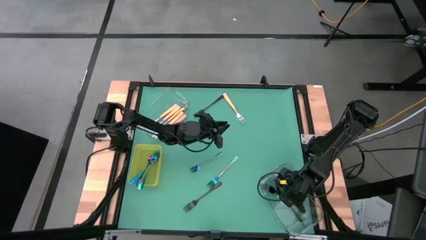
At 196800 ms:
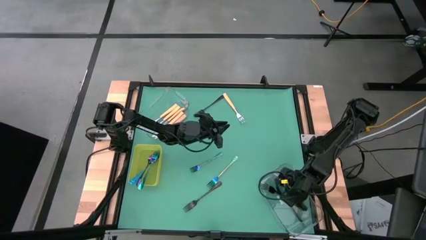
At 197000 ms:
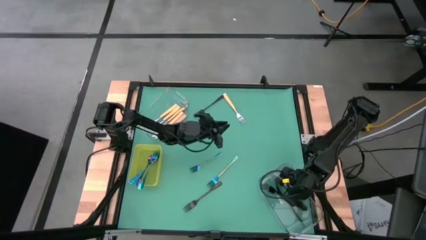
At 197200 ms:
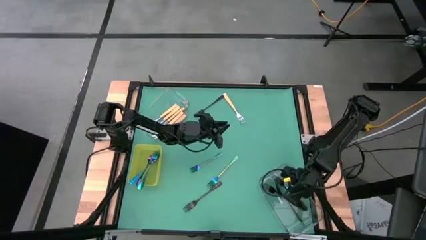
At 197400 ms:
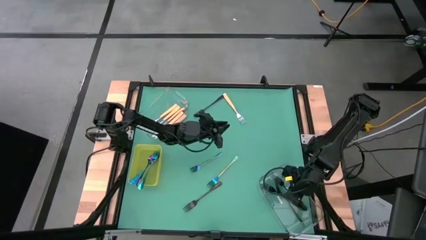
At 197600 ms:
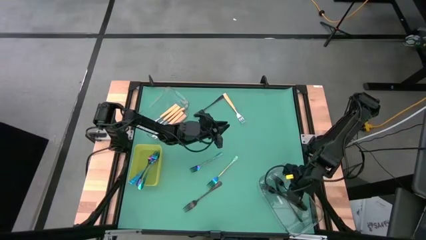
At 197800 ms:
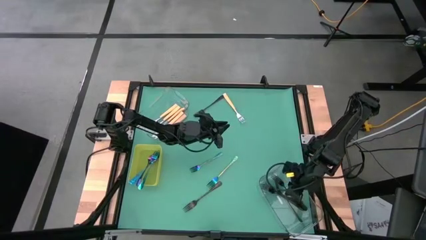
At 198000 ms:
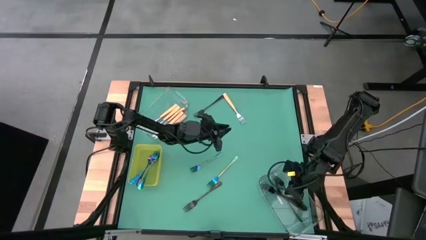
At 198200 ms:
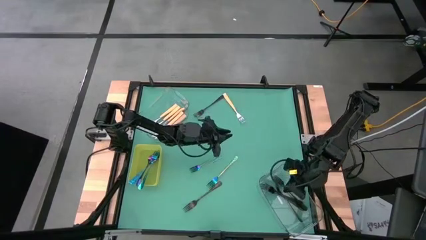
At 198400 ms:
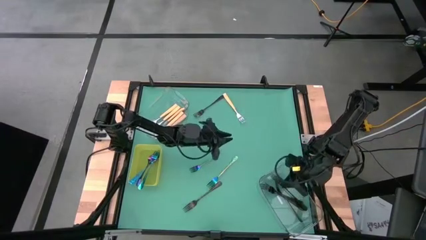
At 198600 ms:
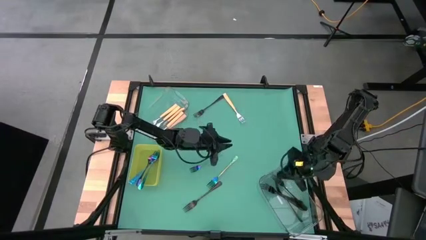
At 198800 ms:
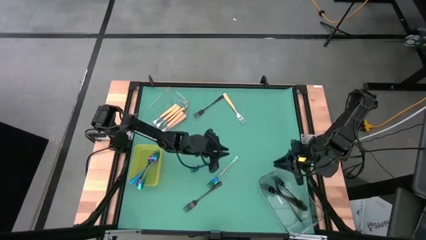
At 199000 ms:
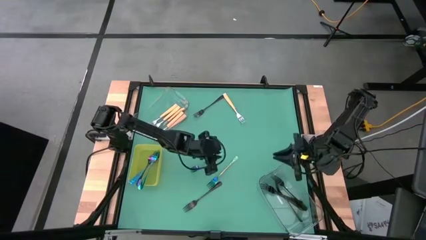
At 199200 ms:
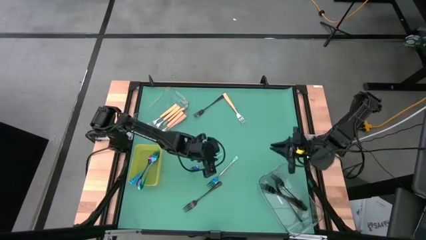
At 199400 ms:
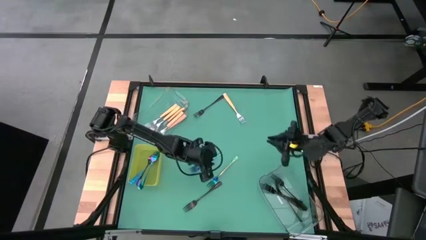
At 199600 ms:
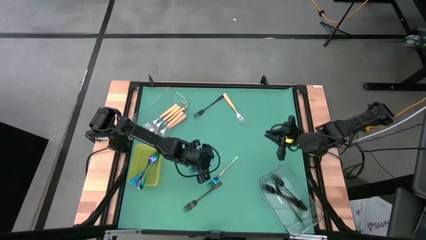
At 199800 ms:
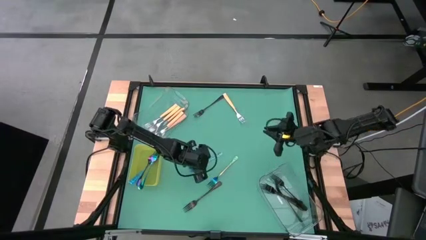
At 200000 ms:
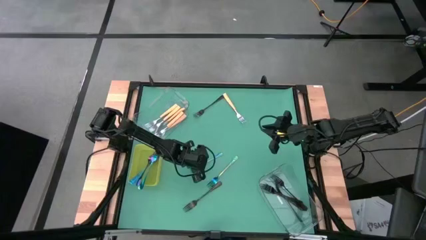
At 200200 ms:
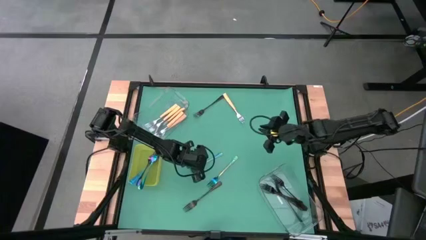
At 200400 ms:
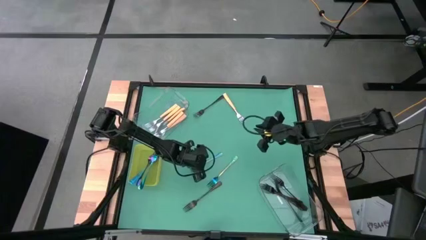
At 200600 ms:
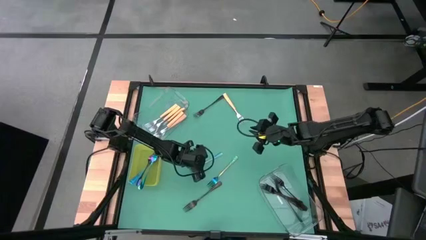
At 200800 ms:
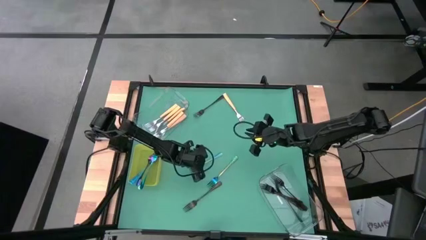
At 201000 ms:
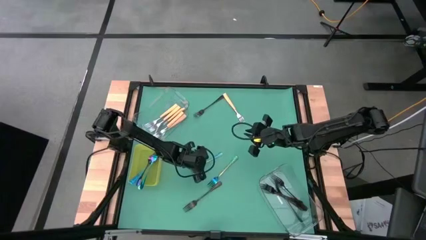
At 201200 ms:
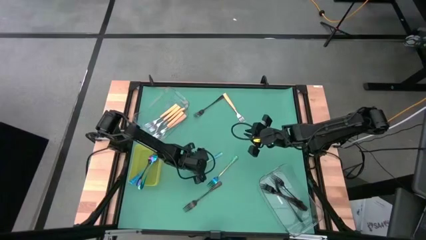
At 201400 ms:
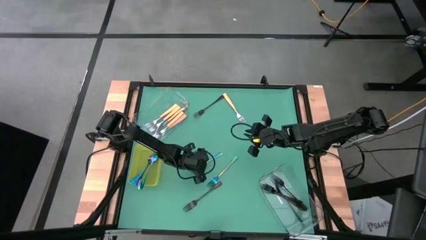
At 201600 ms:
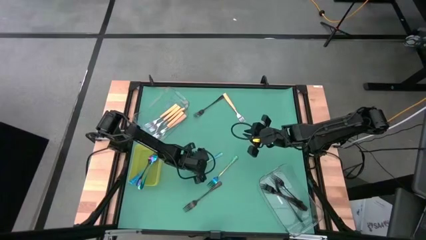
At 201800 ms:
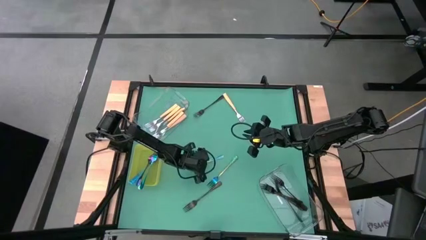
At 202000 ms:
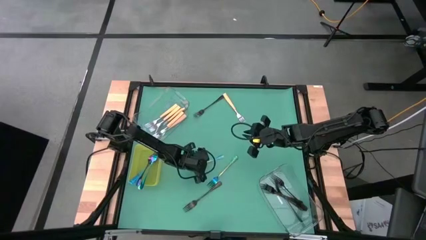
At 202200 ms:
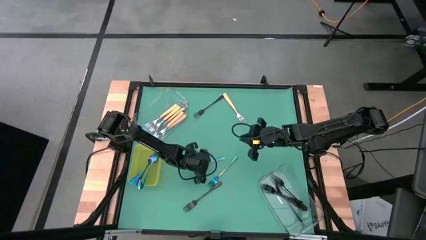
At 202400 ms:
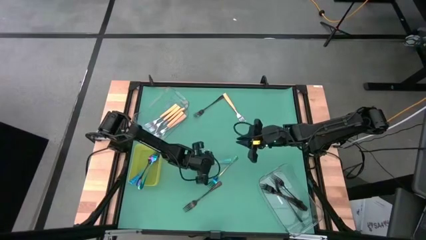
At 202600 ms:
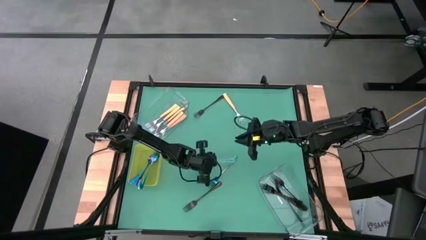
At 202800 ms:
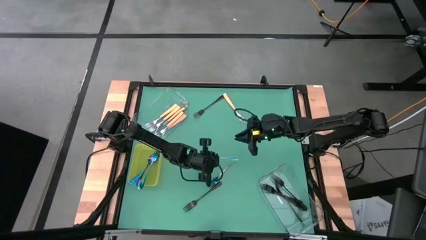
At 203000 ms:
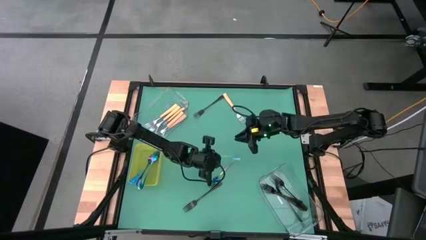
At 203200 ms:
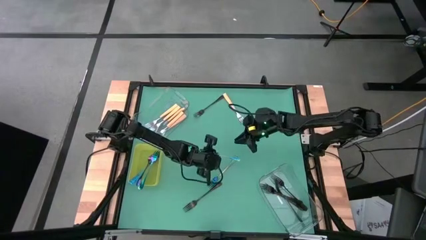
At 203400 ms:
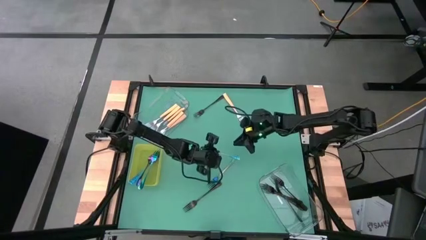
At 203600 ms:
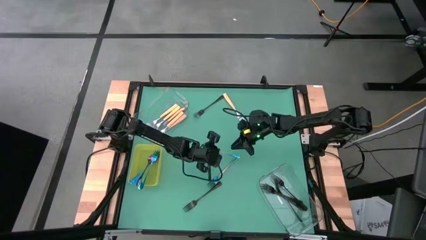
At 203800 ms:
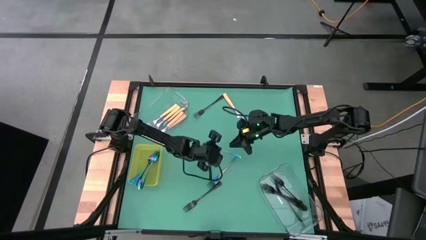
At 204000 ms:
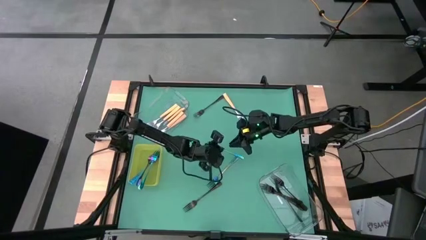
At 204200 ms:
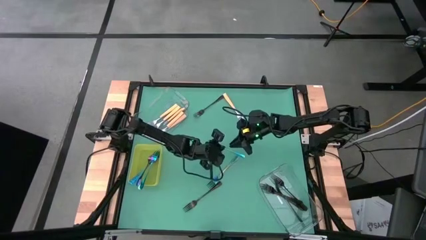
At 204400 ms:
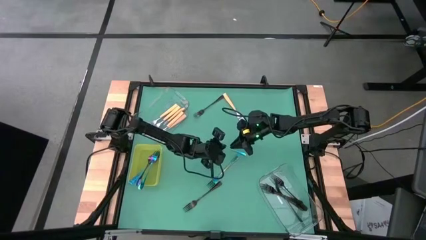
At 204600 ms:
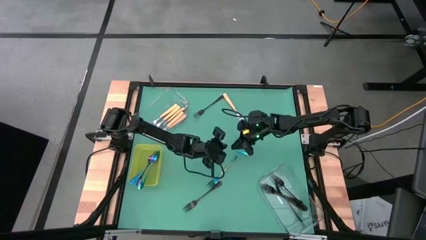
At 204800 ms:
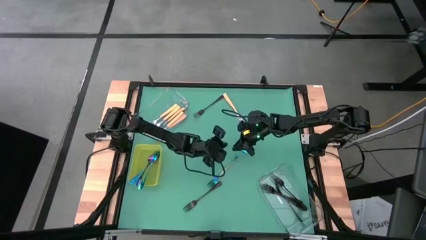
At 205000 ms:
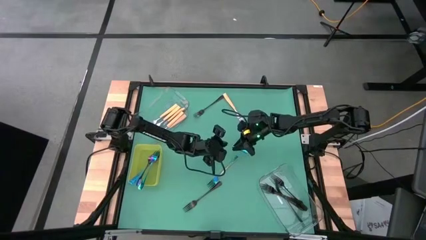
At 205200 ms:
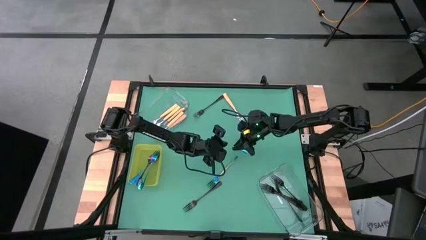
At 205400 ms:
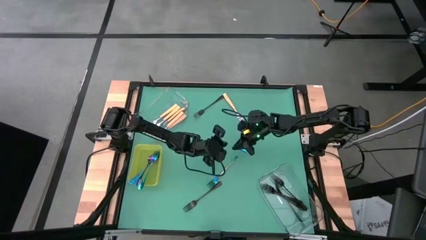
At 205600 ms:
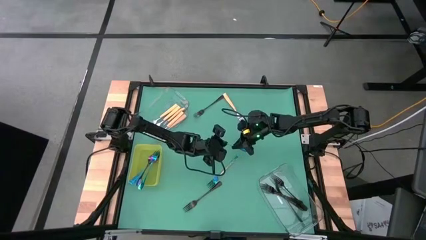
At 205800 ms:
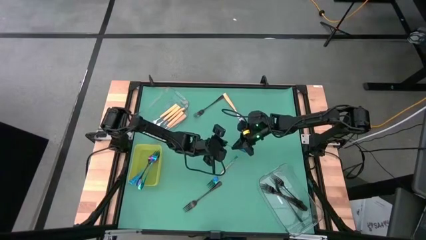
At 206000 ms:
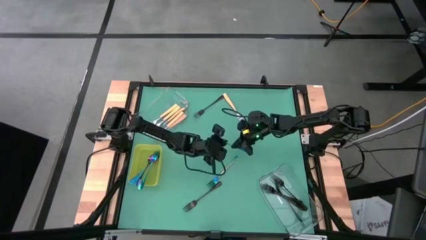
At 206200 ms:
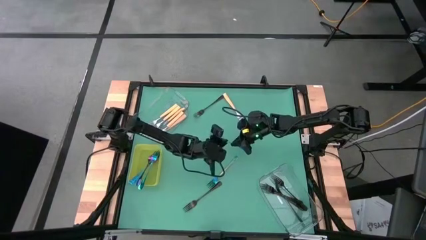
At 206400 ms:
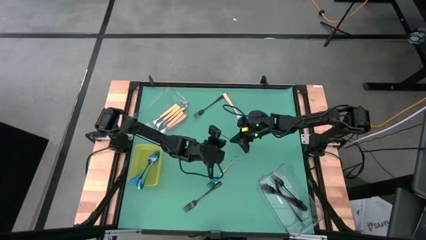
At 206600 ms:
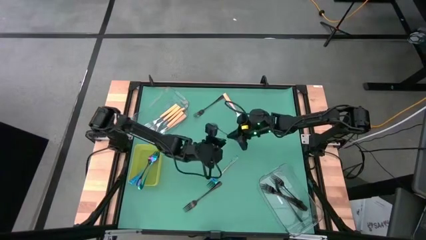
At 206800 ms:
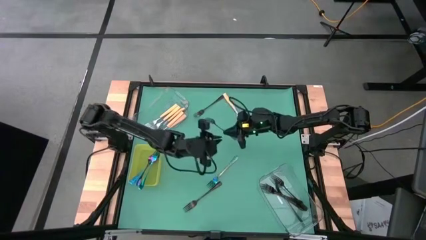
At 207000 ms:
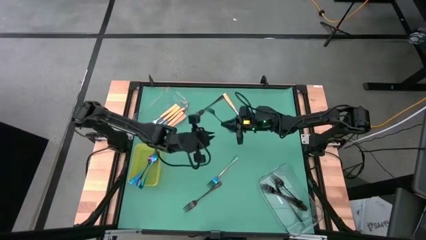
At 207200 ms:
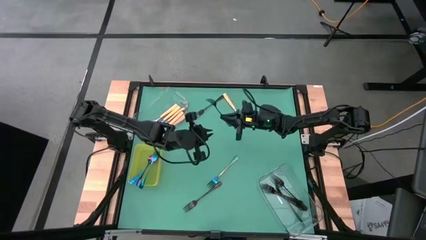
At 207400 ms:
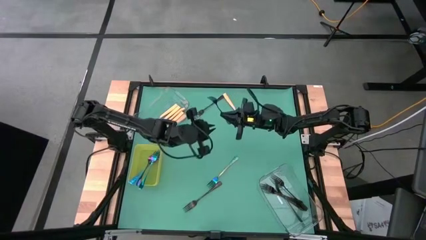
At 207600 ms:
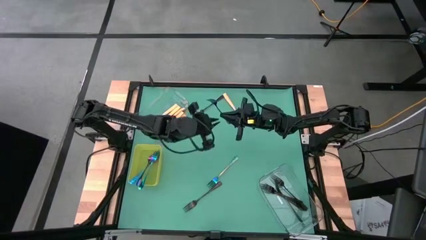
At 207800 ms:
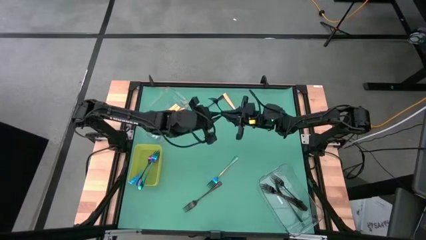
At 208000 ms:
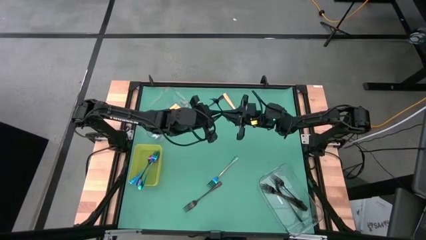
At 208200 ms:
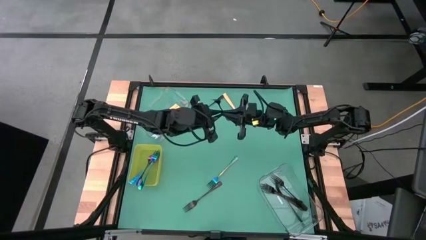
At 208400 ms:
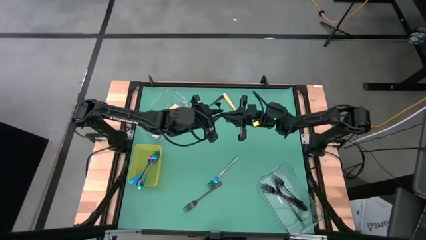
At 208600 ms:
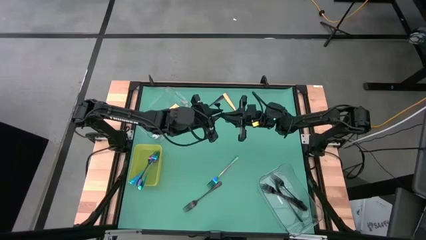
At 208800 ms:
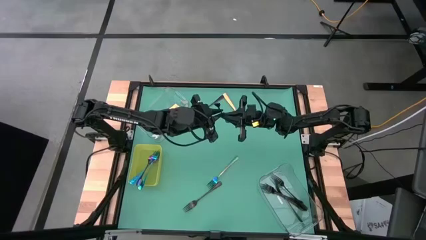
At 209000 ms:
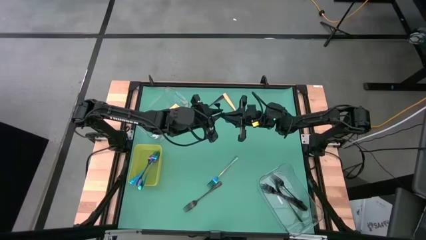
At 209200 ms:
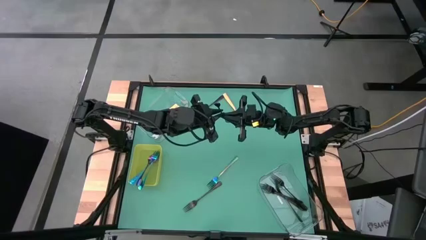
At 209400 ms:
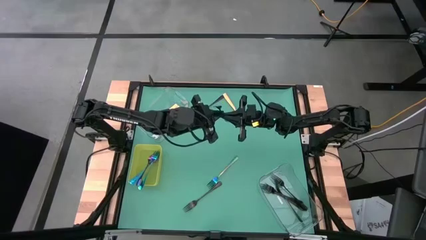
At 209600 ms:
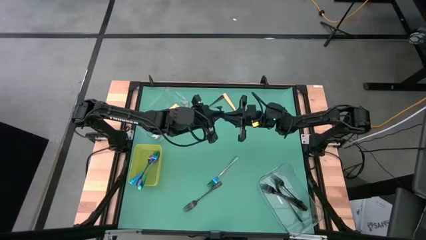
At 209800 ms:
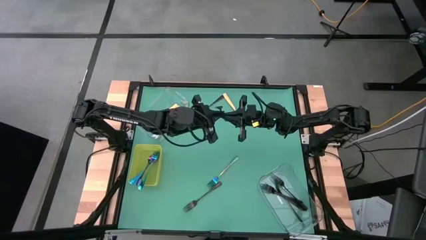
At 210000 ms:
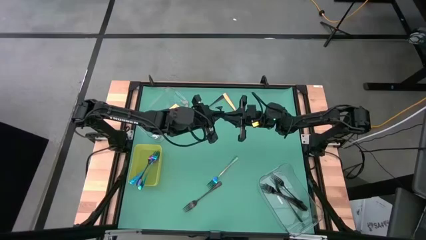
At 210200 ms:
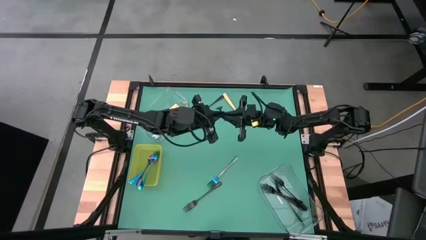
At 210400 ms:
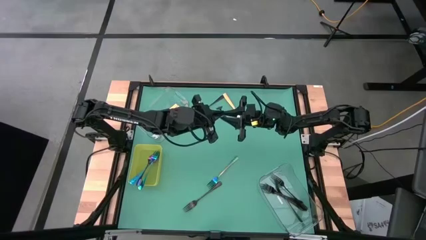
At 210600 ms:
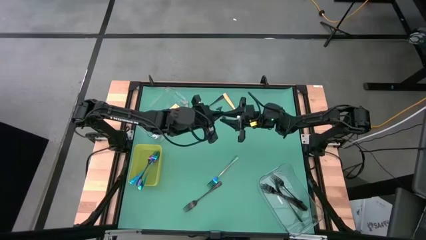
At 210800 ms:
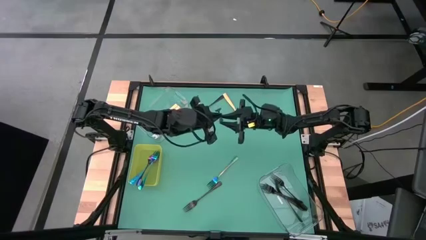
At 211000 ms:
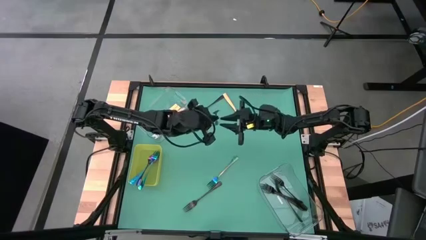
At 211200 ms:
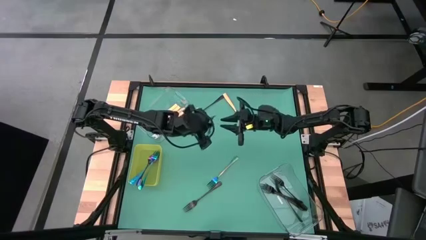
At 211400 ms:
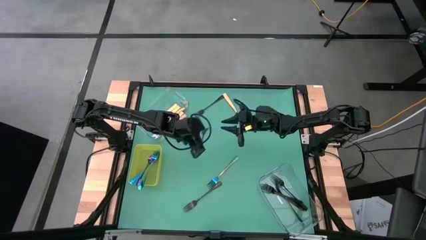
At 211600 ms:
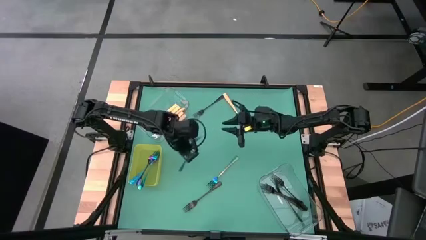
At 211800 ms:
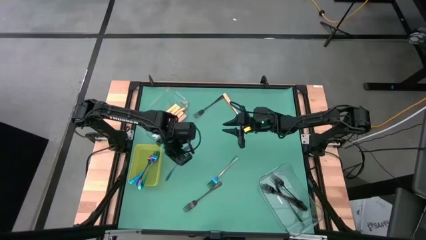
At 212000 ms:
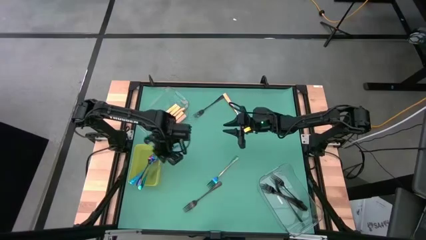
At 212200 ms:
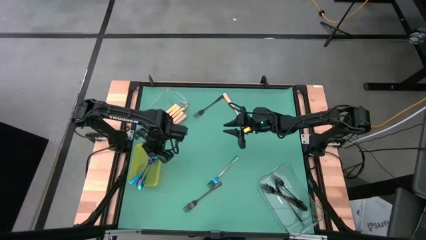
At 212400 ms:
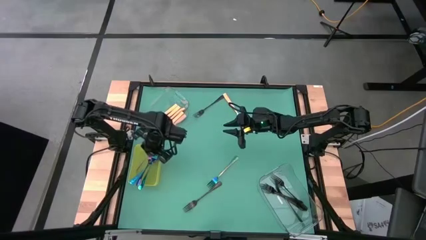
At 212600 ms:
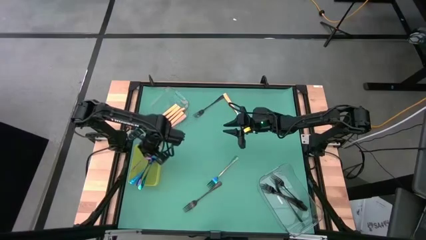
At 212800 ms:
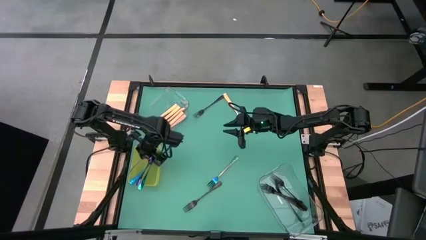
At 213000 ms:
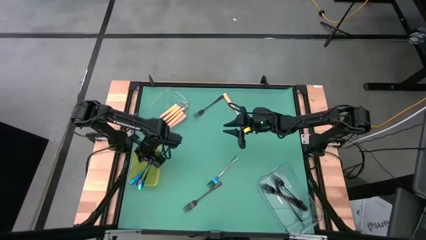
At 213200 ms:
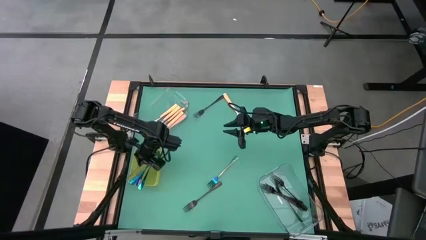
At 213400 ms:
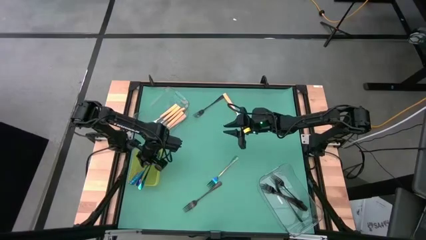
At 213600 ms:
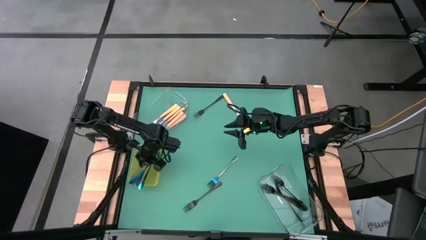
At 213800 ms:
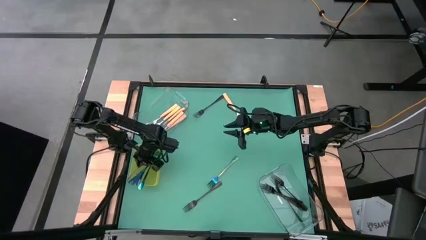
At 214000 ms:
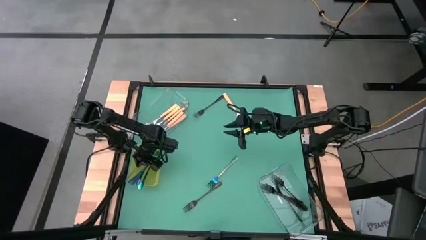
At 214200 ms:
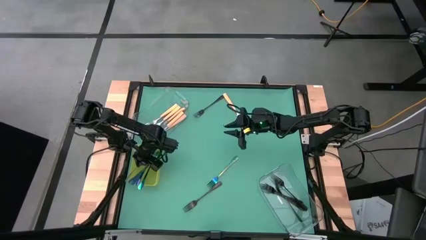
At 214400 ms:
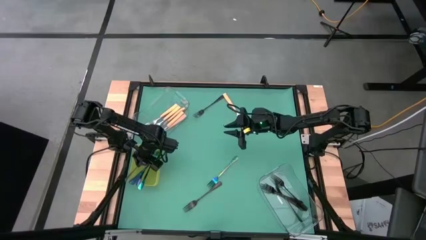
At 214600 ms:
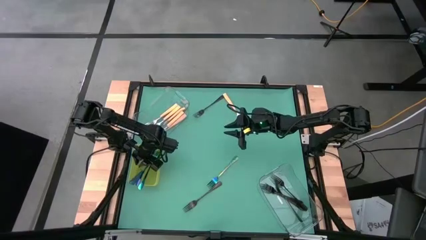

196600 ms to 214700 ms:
Task: Sort silverware by color (type)
Put the blue fork in the yellow bin
